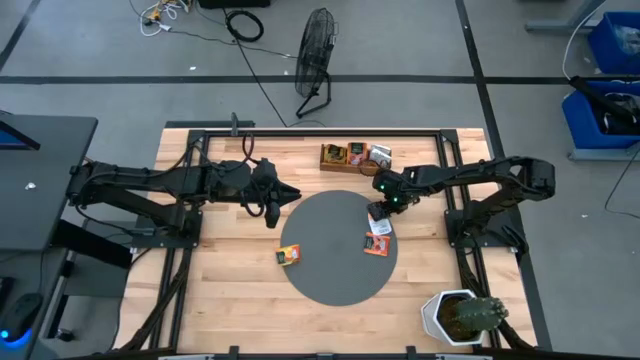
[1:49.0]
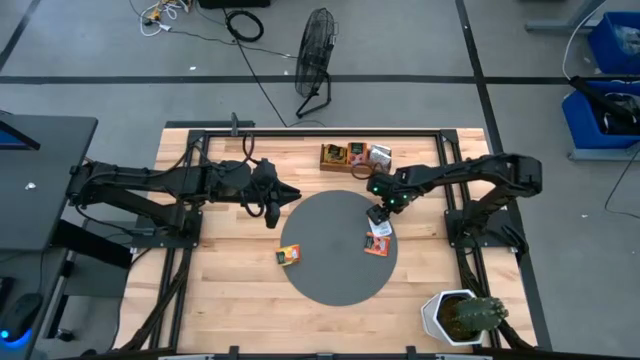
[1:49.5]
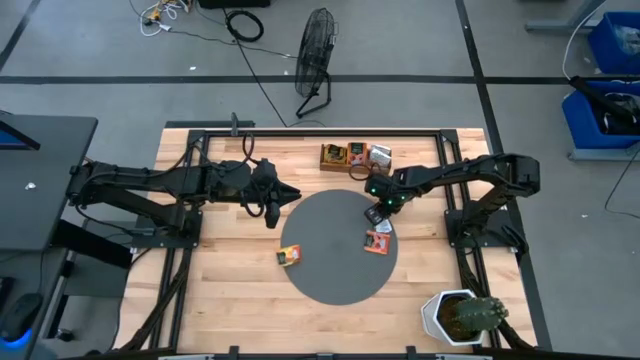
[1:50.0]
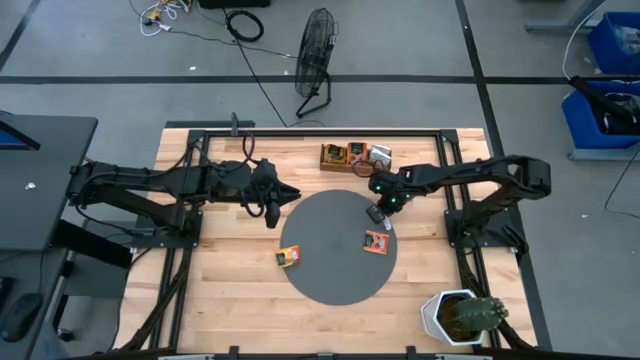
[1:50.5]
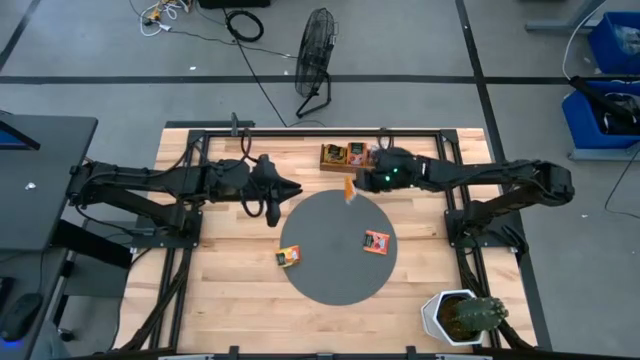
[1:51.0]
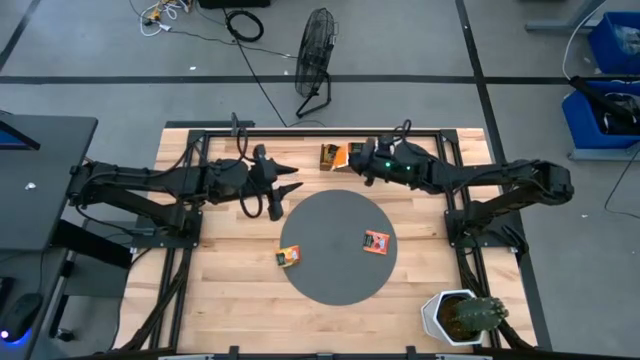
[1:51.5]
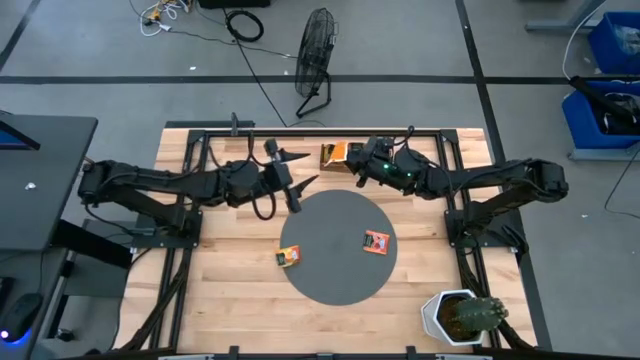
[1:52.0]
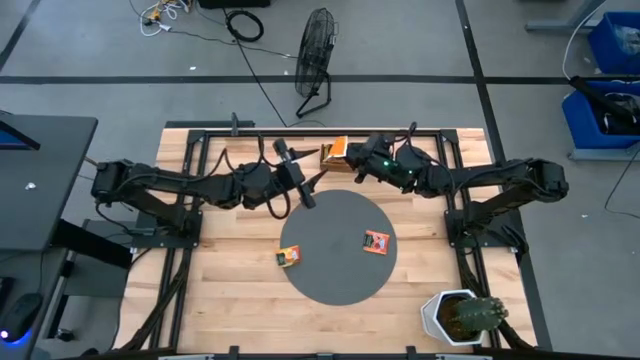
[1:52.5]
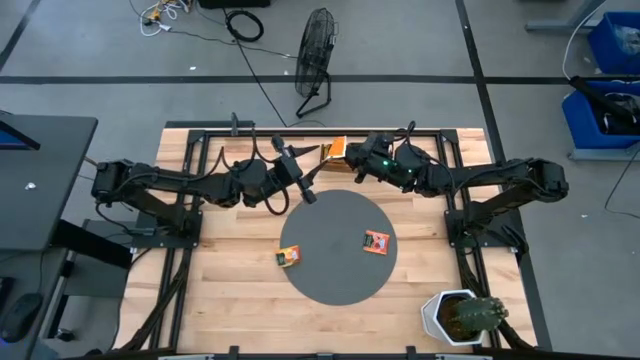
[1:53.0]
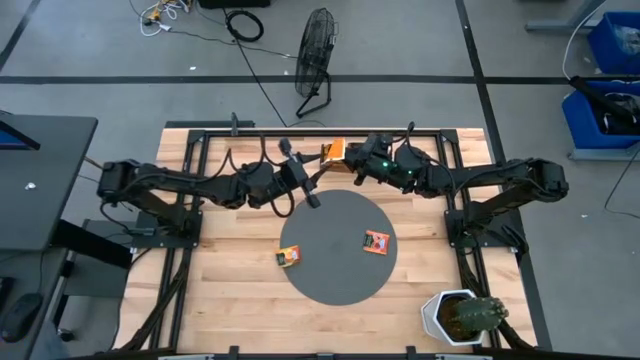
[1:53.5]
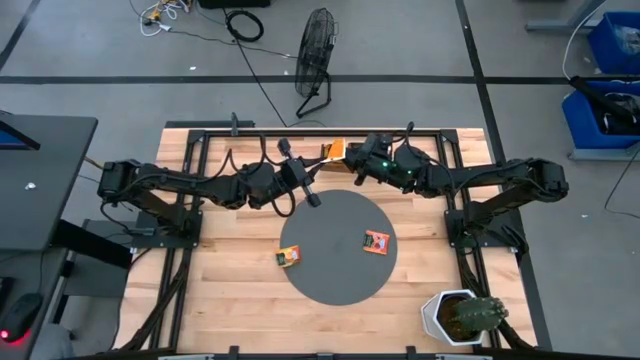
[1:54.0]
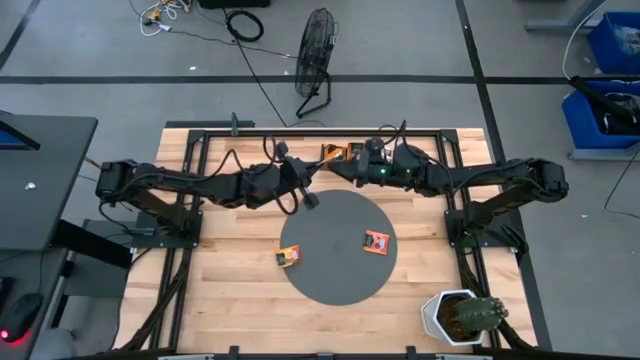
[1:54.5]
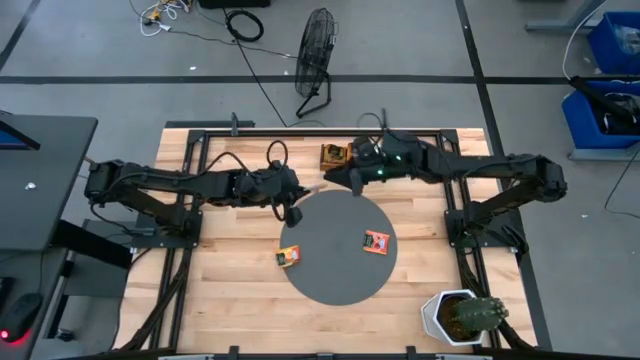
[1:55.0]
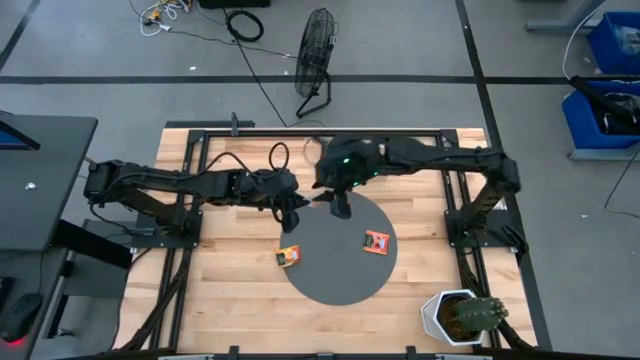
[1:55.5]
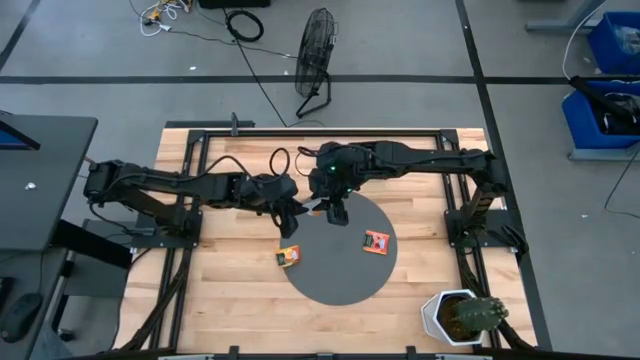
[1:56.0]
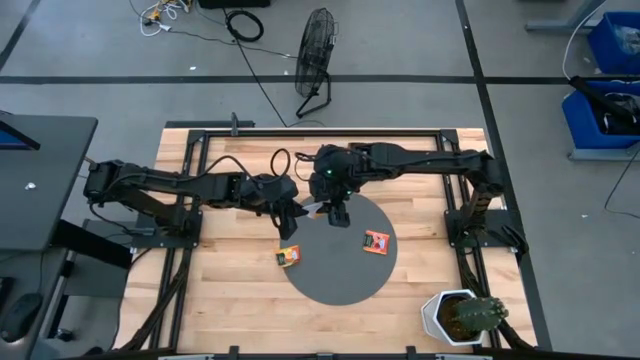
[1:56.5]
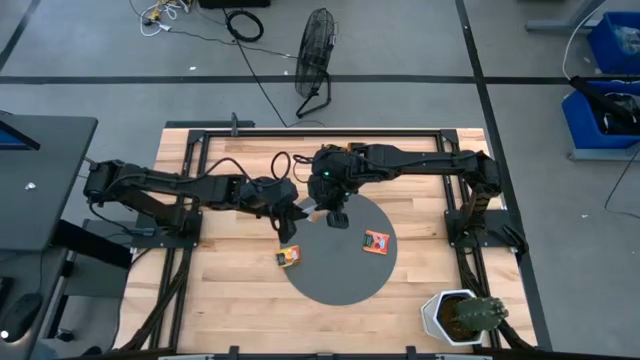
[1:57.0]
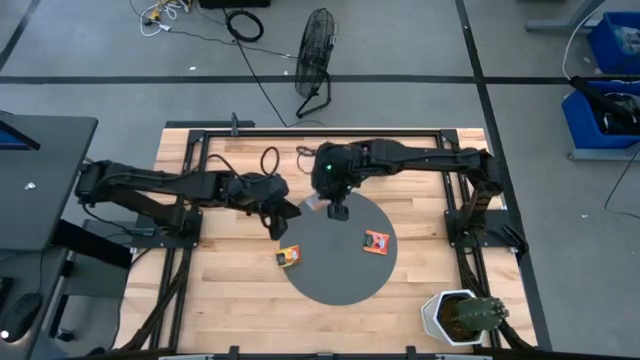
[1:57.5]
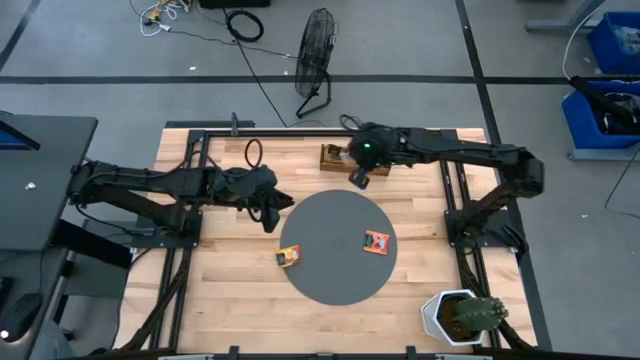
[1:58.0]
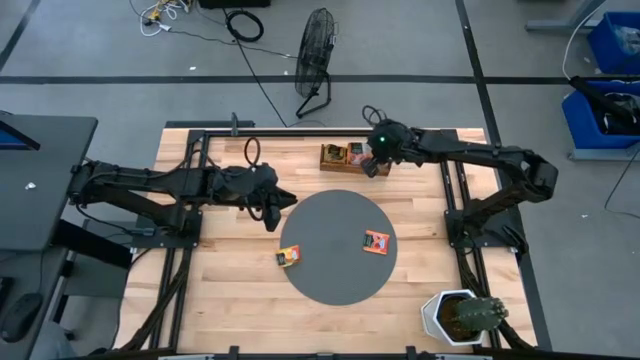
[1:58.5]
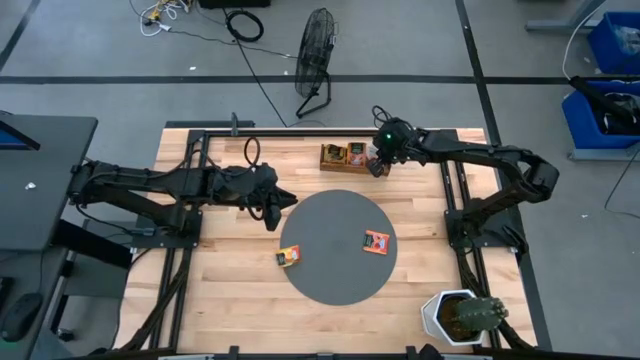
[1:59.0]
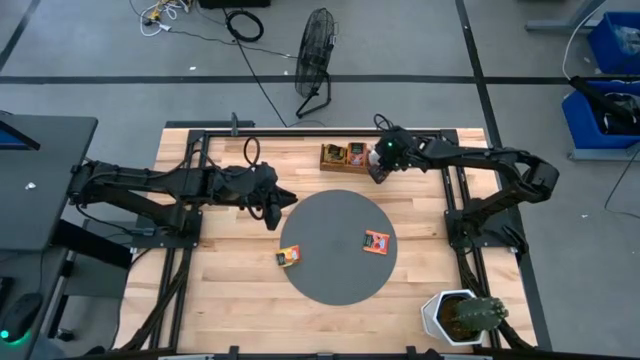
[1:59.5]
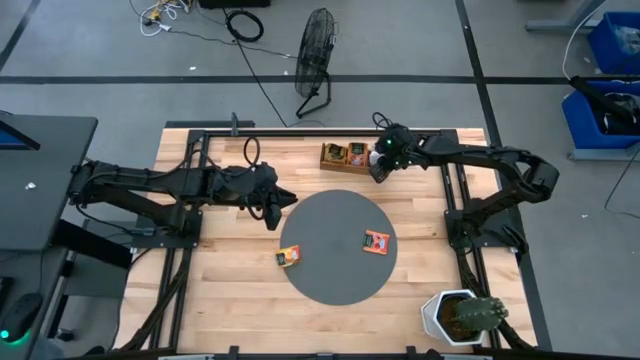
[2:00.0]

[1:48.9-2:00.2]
Task: Pick & Place Tea
Put the white tea bag into the right section of the wooden organizer
